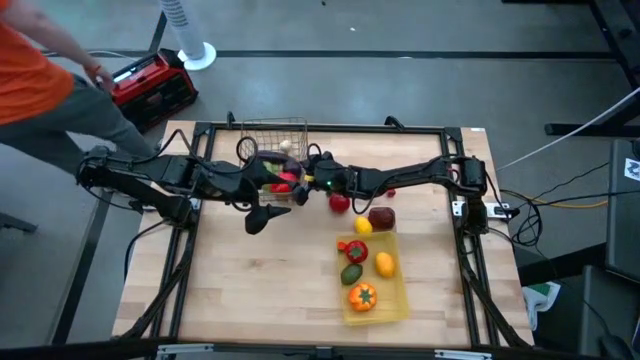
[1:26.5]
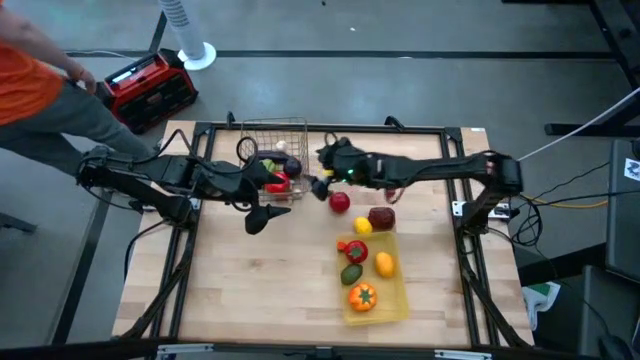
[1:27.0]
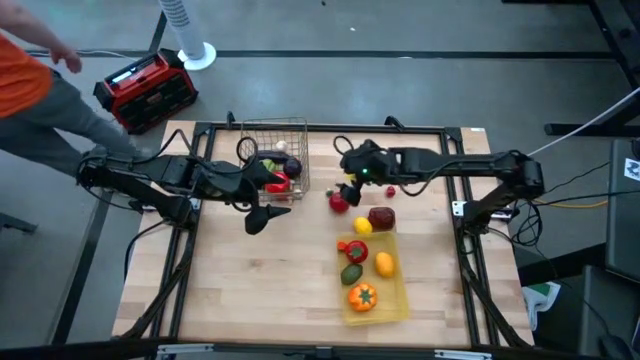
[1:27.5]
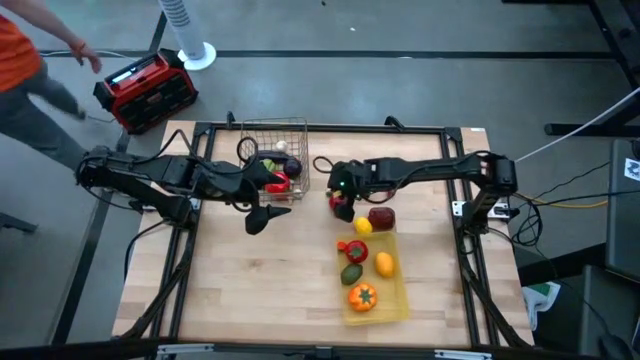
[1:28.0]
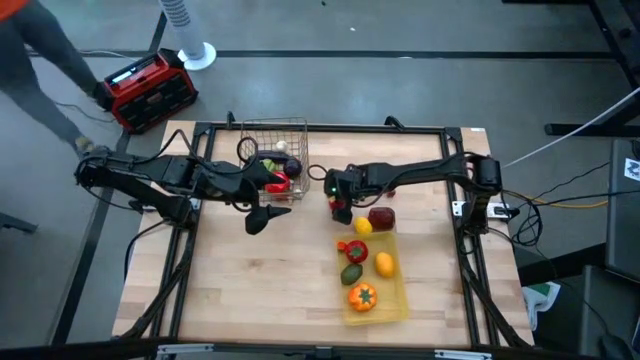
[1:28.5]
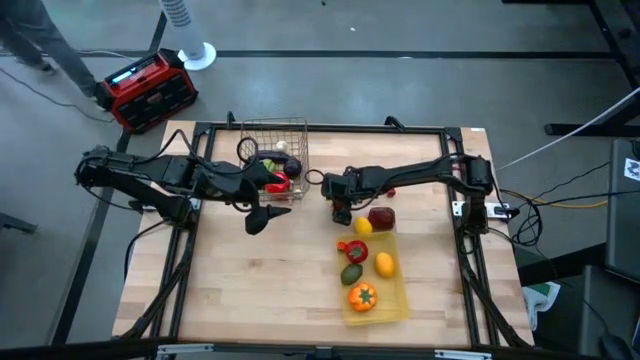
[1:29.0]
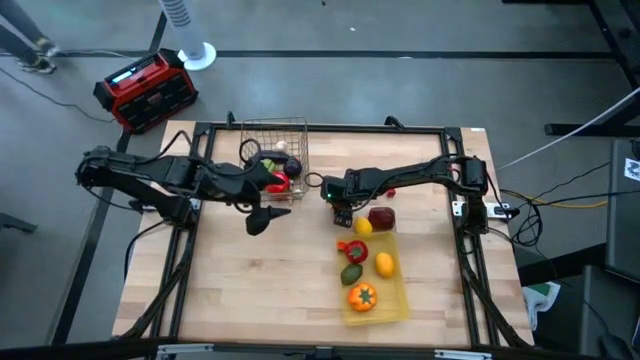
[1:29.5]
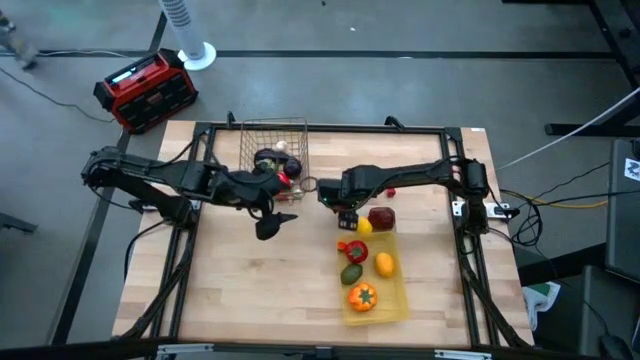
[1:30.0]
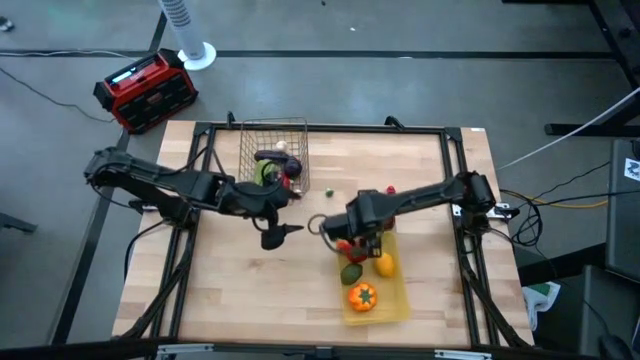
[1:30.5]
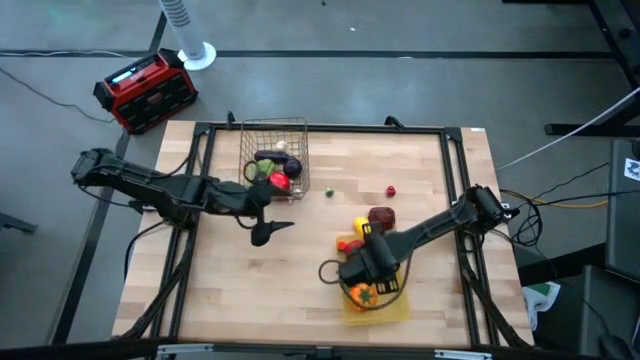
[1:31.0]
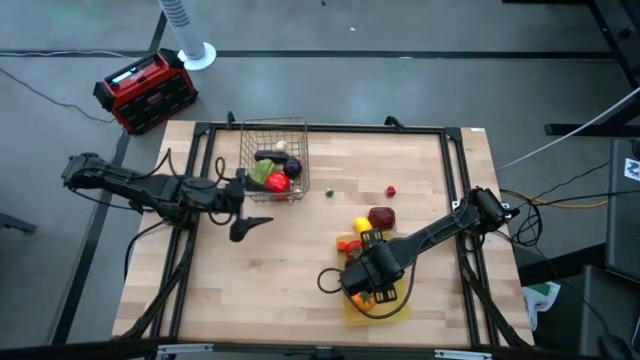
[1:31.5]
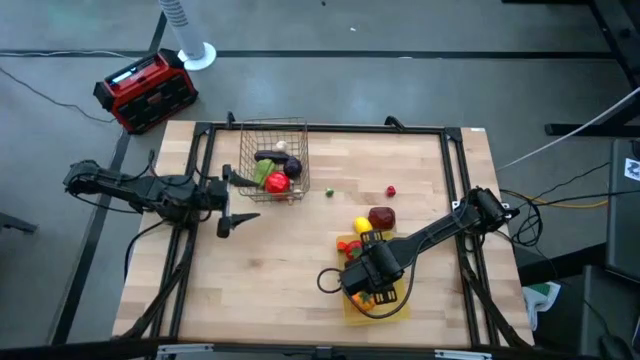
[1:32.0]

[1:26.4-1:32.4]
Task: Sort produce into baskets
Put the red tomato into the yellow bin

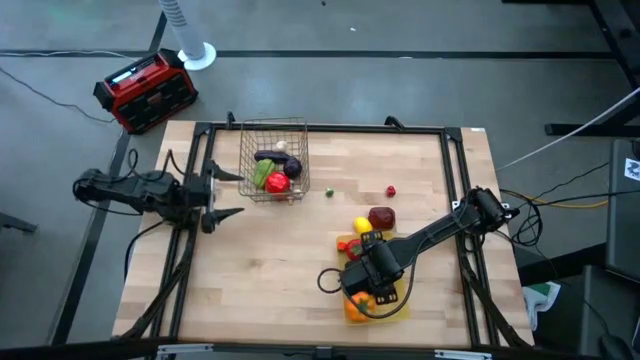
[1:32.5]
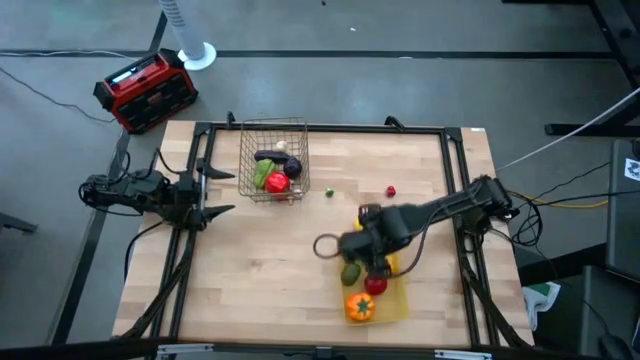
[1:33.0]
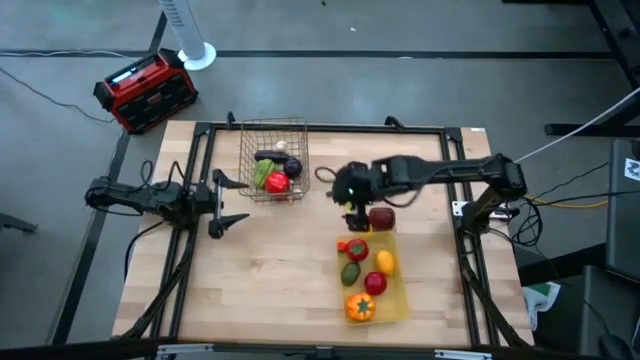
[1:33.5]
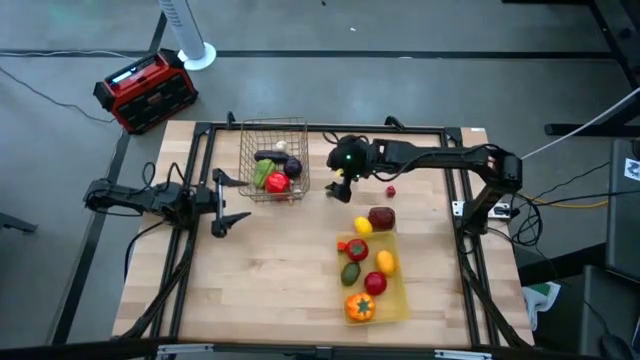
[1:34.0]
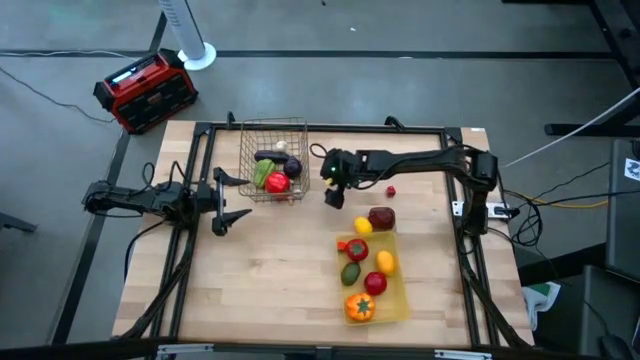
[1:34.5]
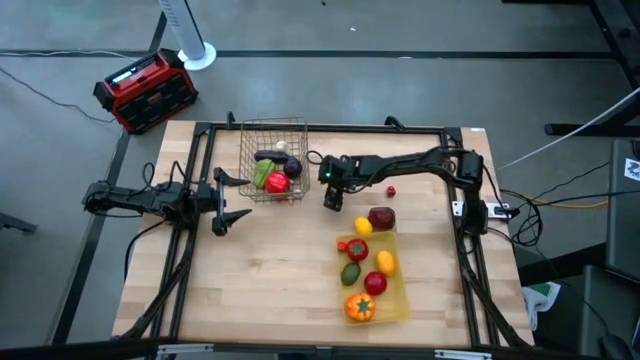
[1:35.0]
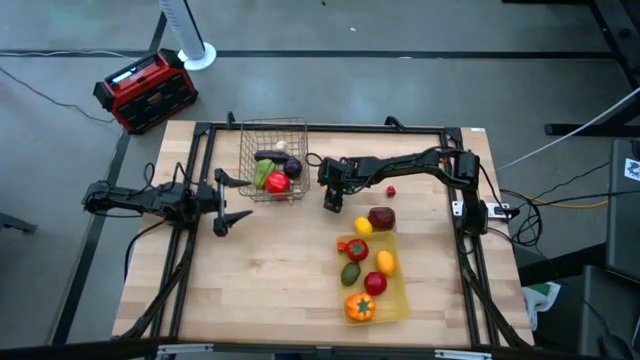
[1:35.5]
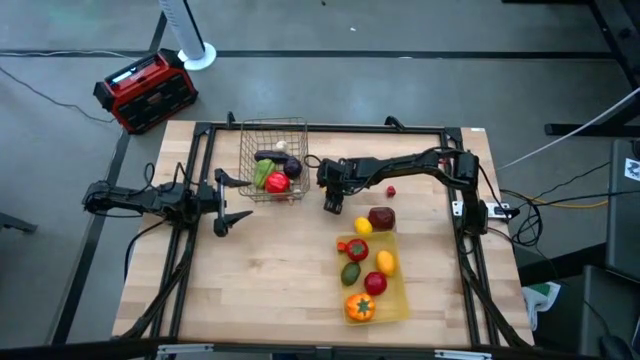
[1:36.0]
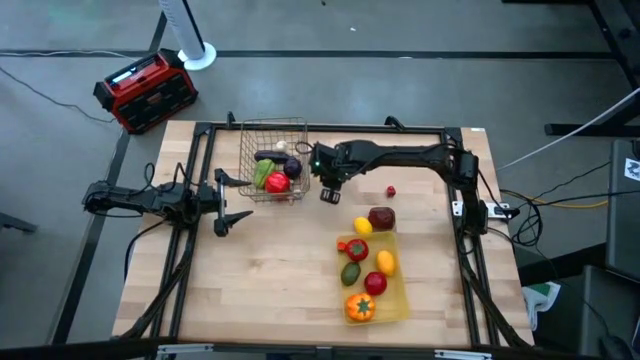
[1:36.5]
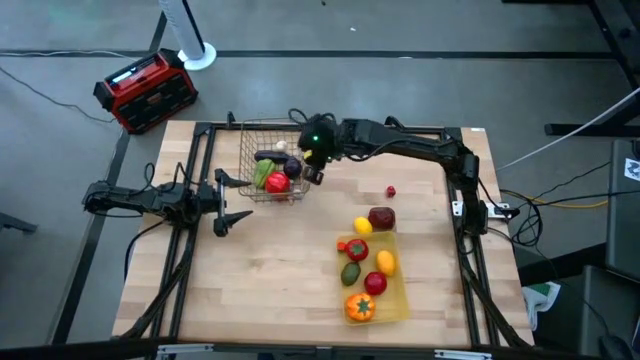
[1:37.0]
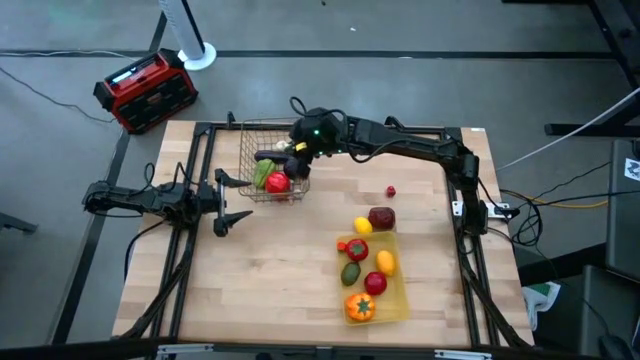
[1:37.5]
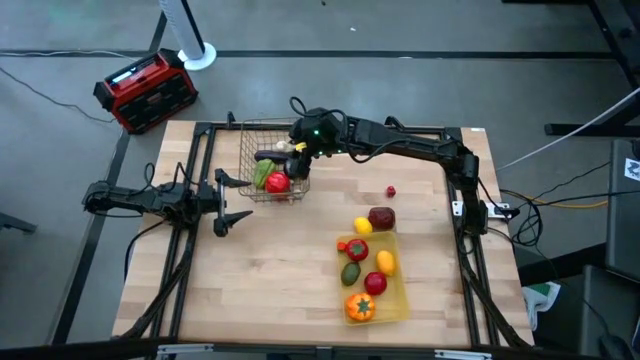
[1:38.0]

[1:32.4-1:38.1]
Put the green mushroom into the brown wire basket

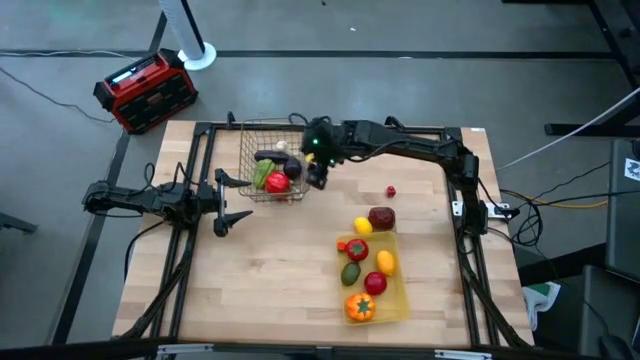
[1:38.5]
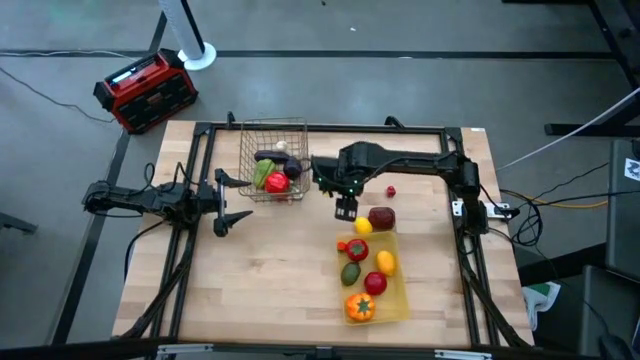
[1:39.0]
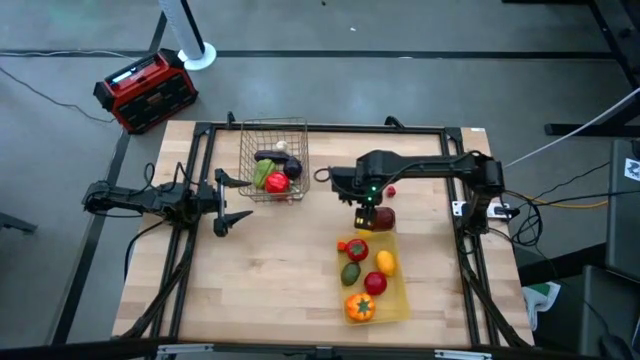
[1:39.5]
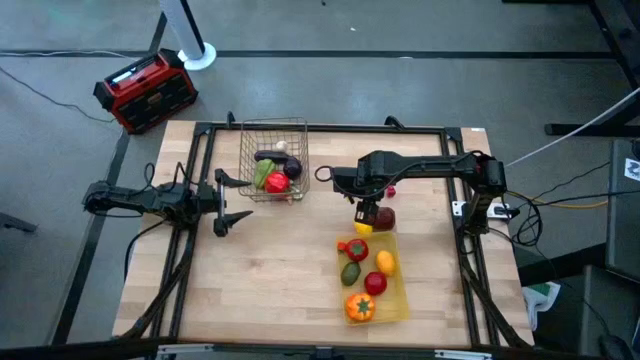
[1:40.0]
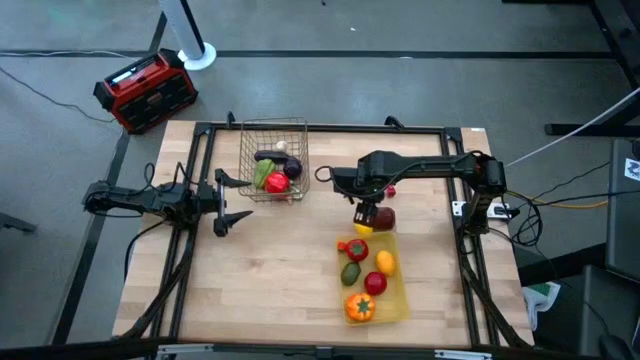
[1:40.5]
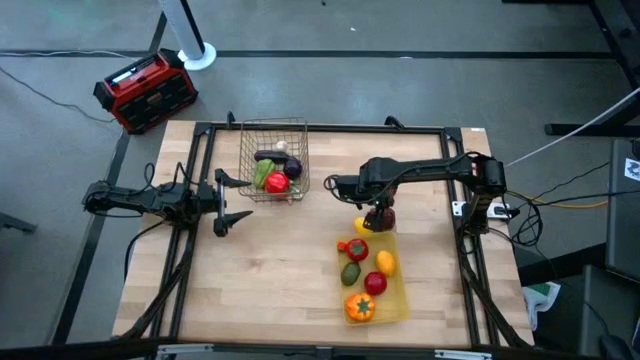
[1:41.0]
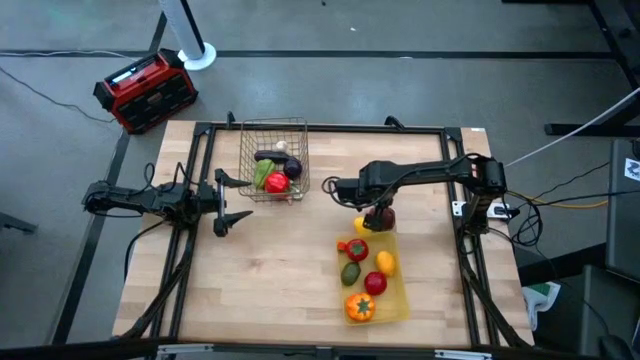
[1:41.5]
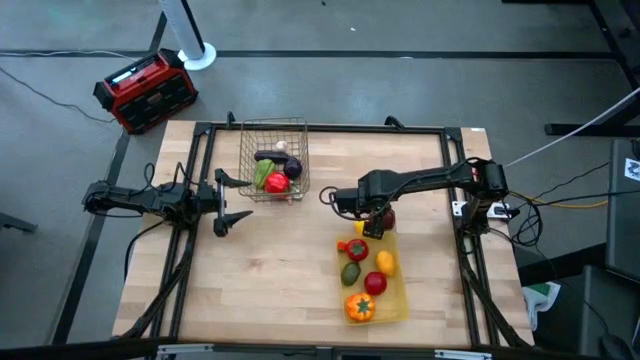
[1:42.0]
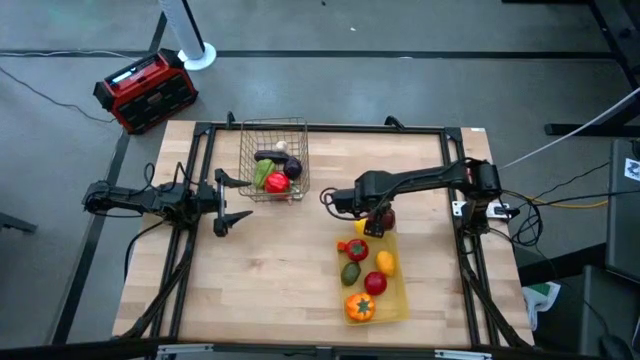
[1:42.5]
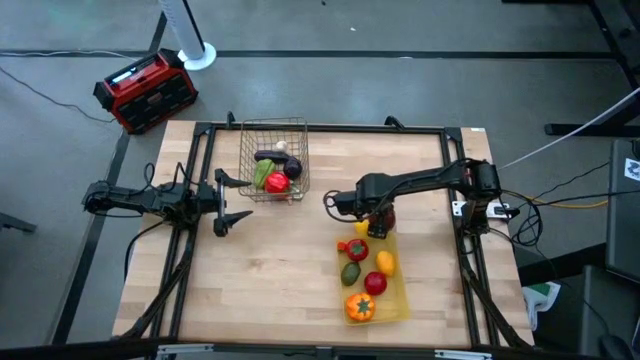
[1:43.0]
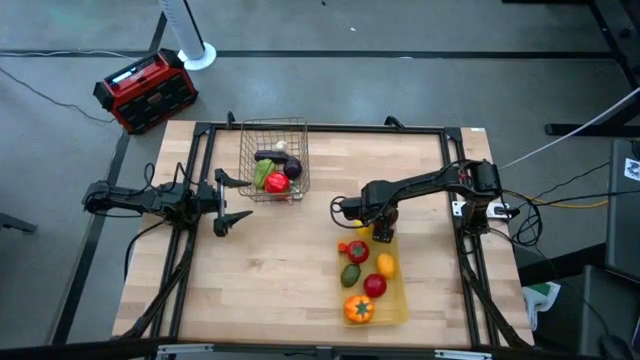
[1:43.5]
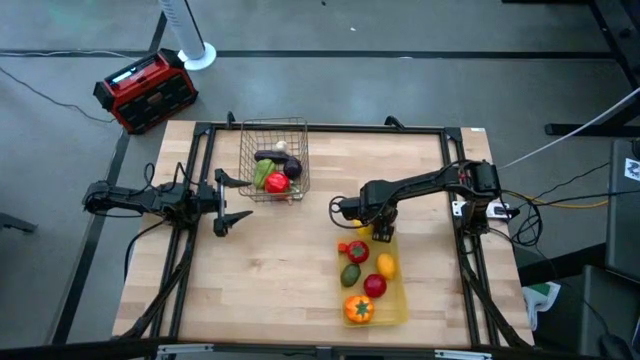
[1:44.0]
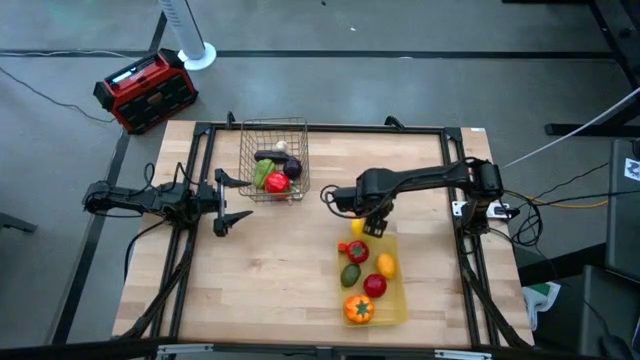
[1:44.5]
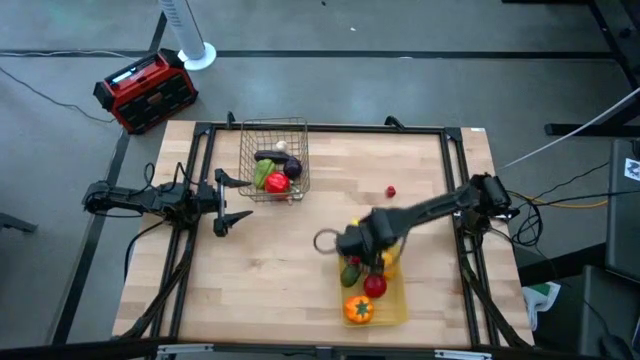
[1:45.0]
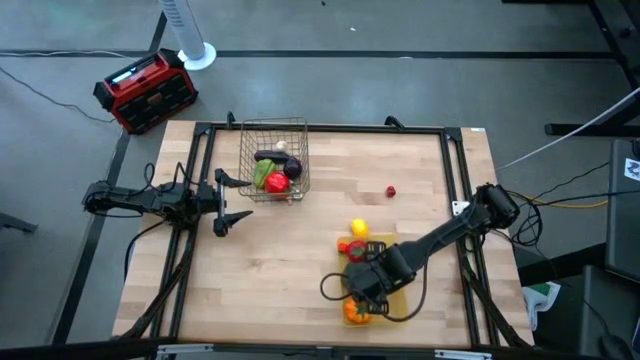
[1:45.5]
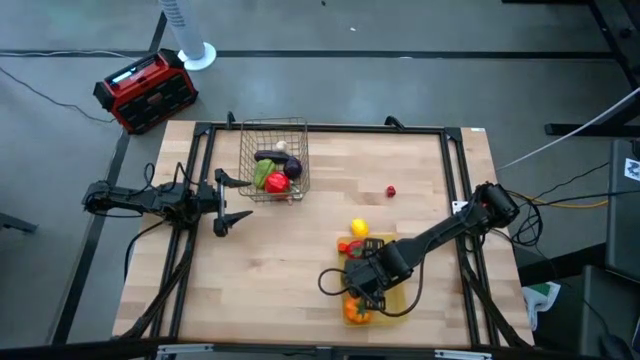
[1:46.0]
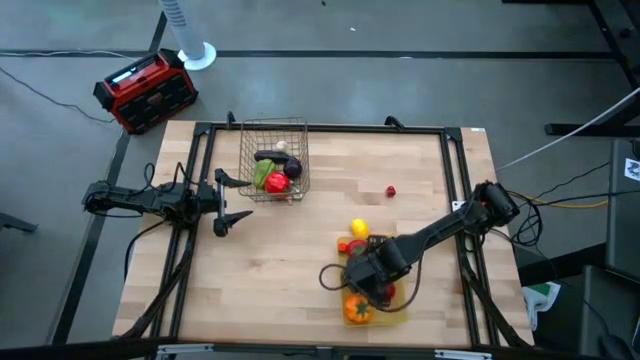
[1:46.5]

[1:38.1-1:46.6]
Put the apple into the yellow bin
